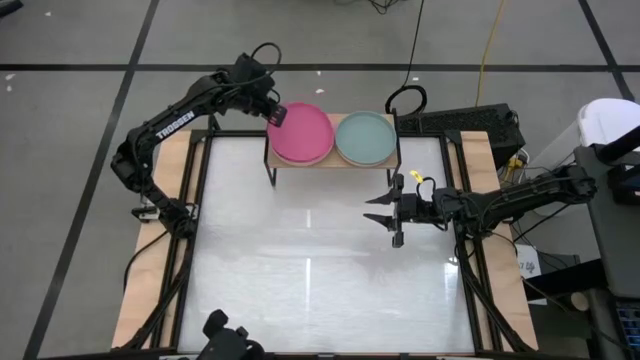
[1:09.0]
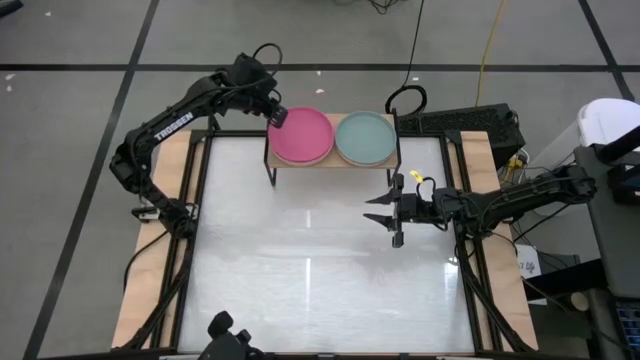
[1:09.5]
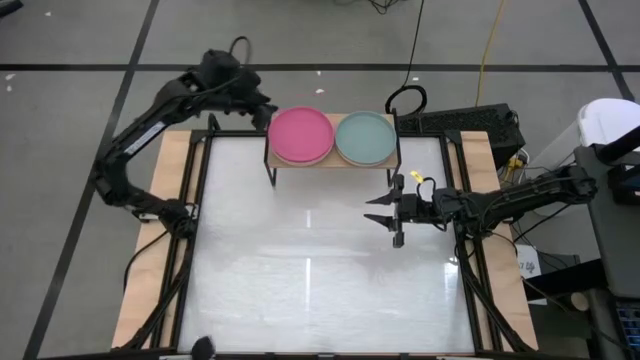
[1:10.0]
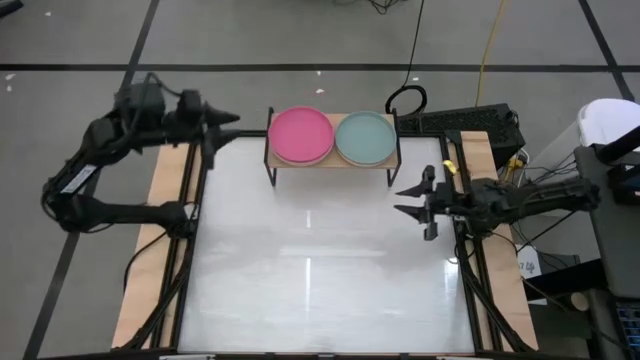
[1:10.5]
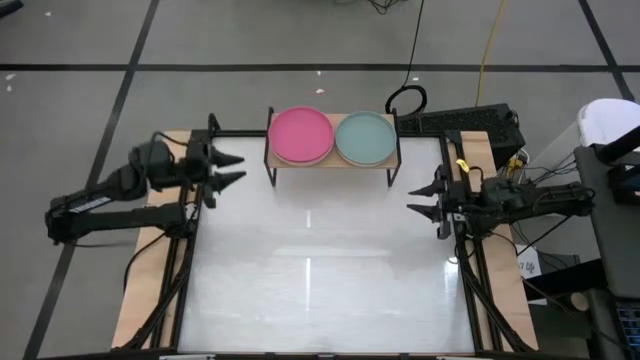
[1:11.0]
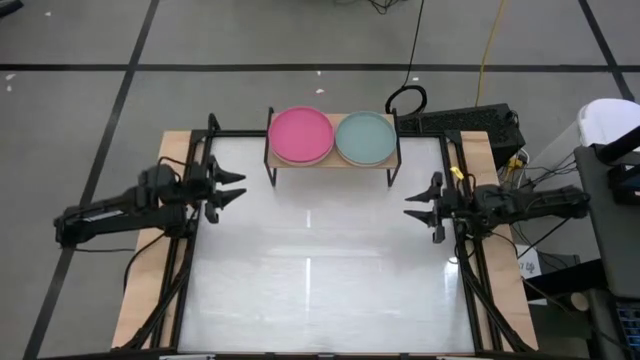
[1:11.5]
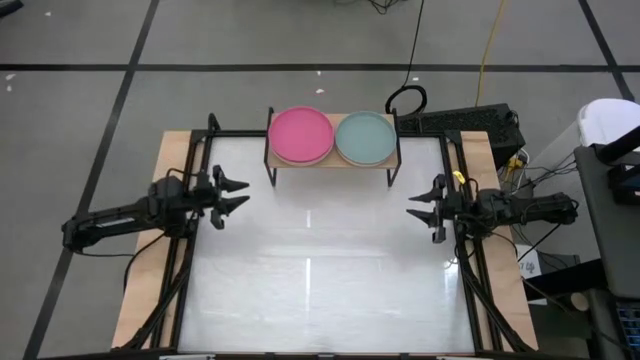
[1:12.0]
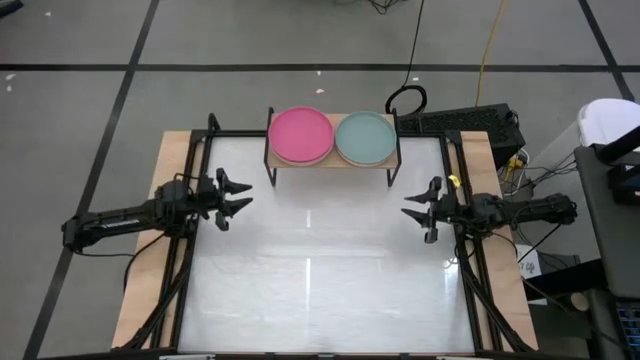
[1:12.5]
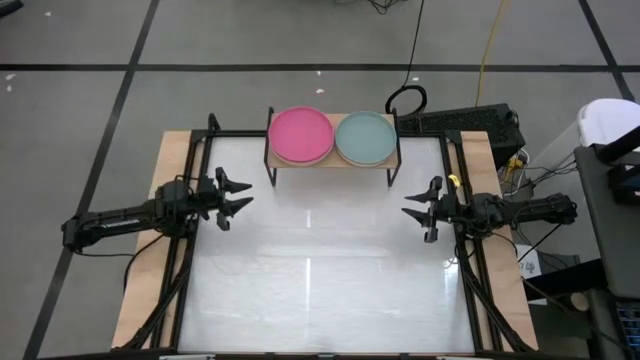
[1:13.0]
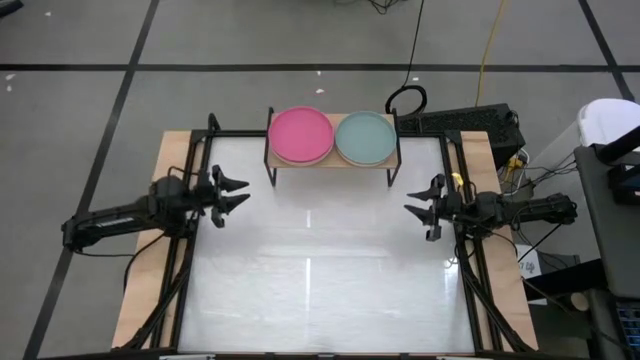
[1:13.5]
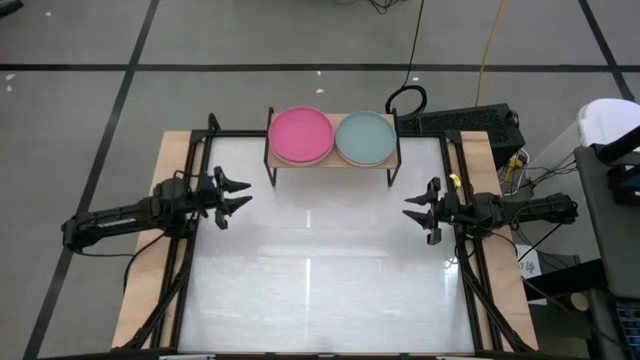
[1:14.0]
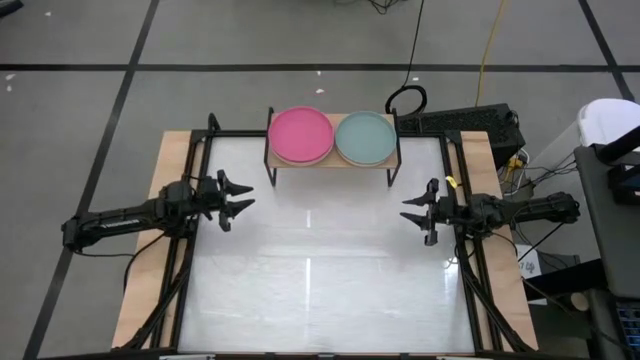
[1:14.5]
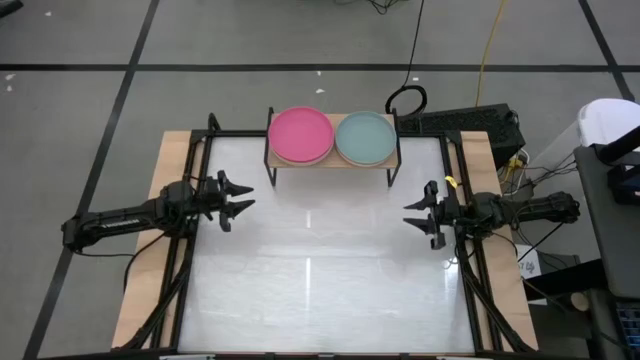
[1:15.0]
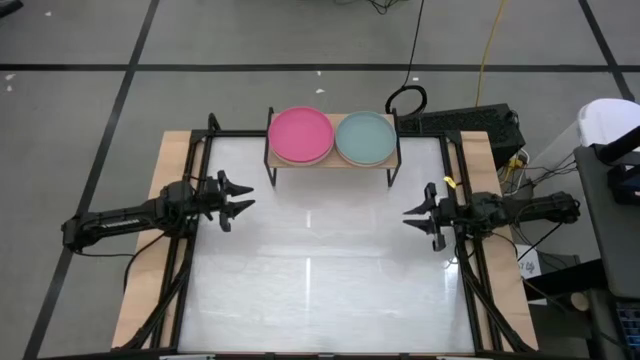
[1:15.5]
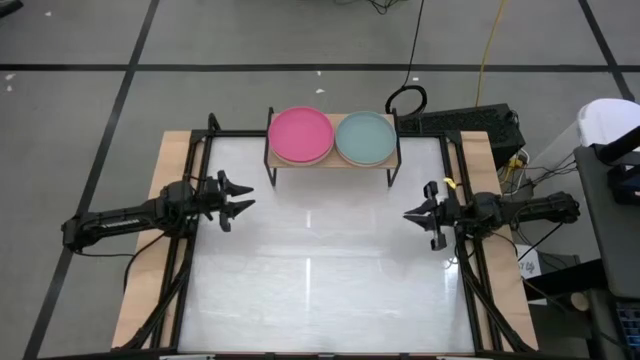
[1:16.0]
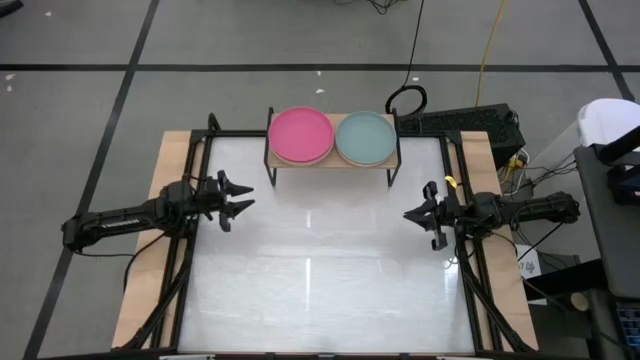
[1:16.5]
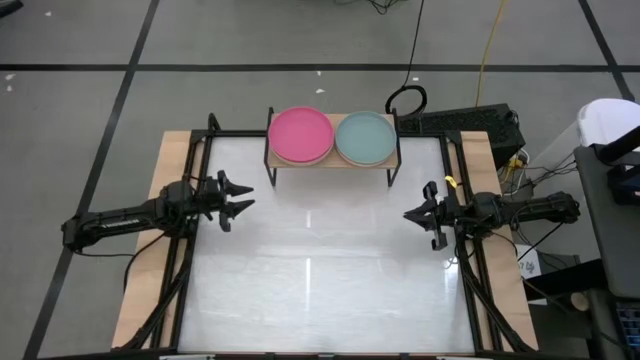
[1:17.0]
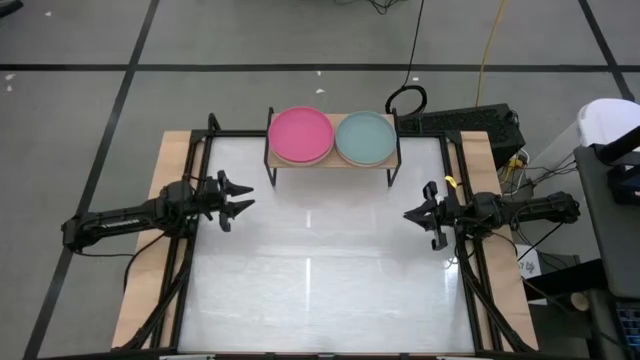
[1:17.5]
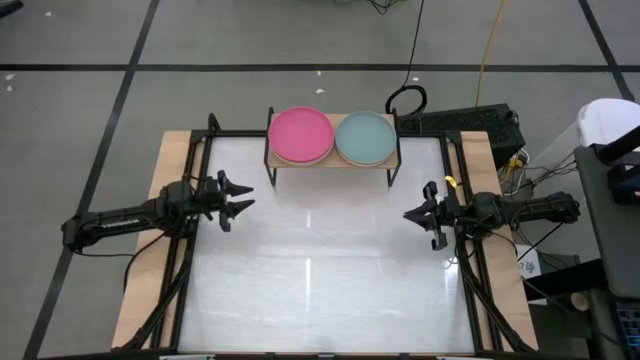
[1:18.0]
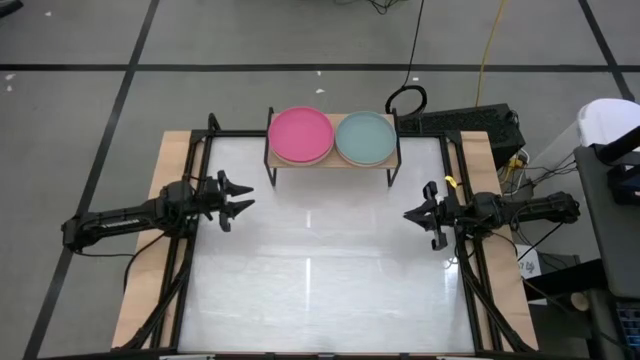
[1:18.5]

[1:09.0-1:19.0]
Task: Place and stack plates onto a shelf
Return to Home Position

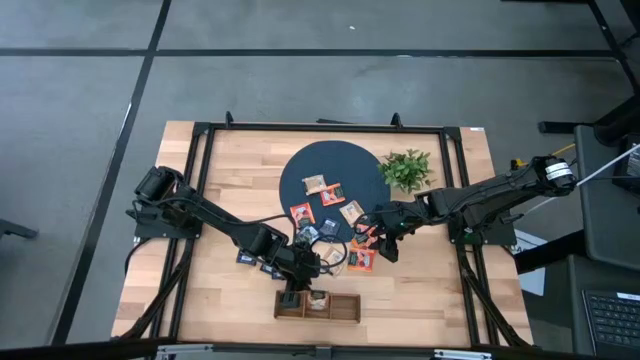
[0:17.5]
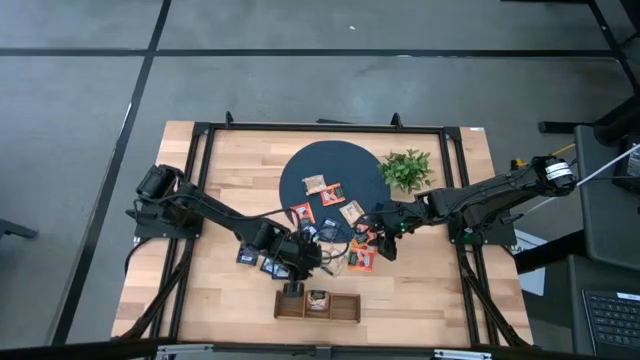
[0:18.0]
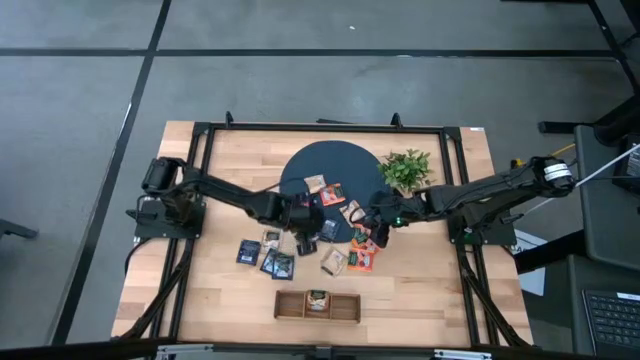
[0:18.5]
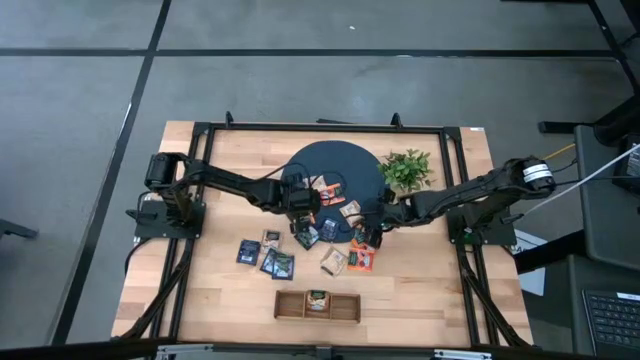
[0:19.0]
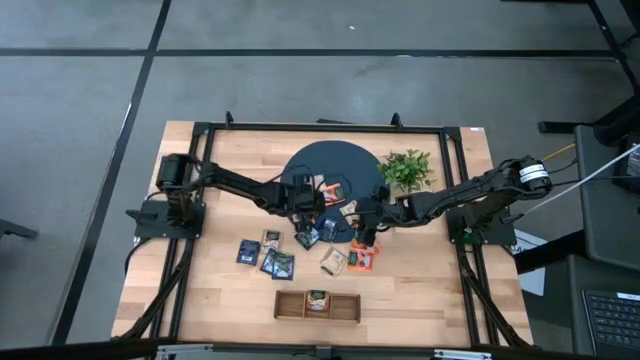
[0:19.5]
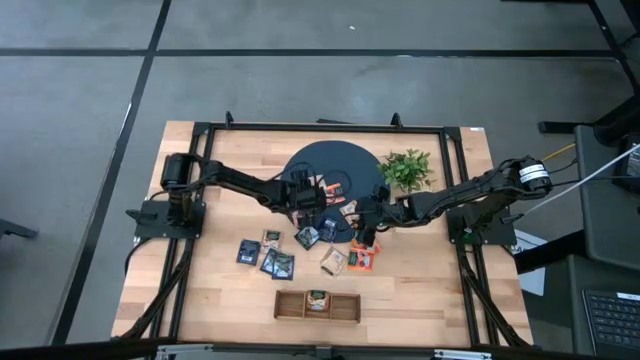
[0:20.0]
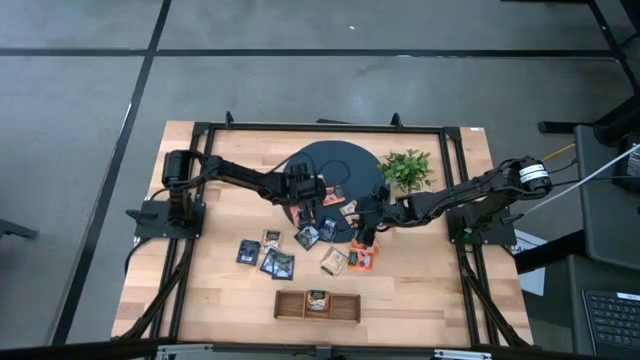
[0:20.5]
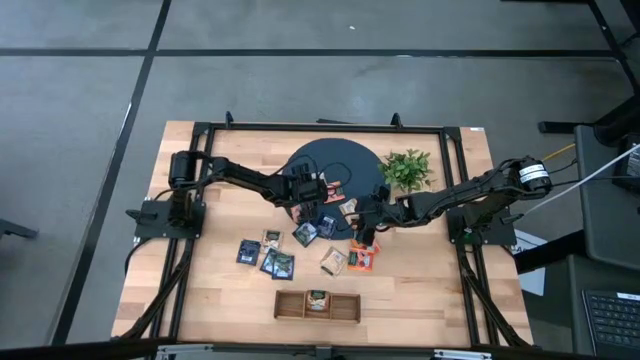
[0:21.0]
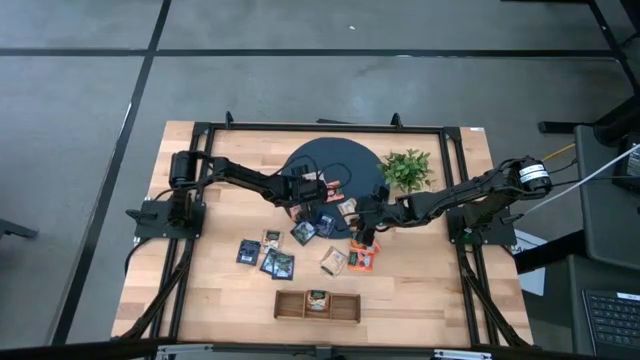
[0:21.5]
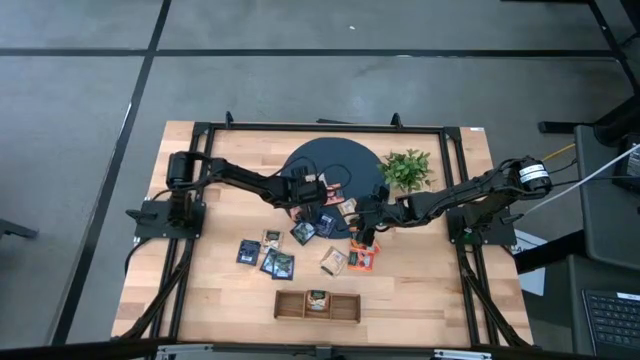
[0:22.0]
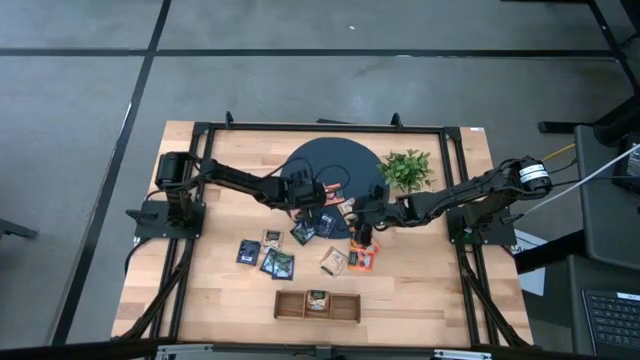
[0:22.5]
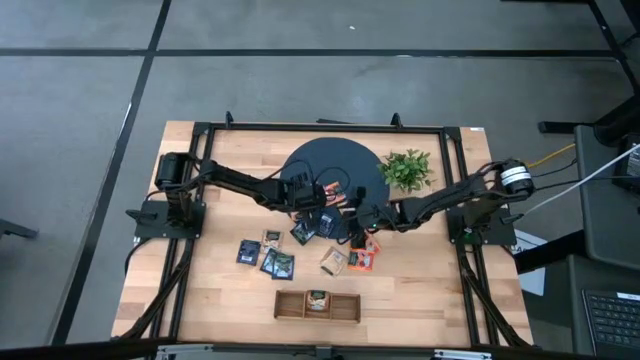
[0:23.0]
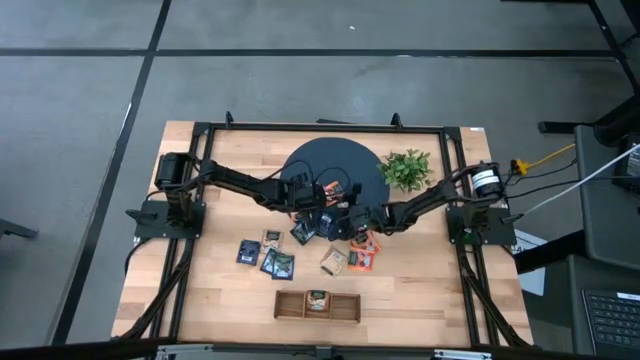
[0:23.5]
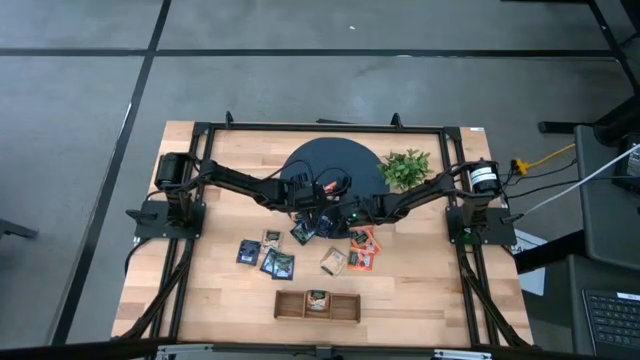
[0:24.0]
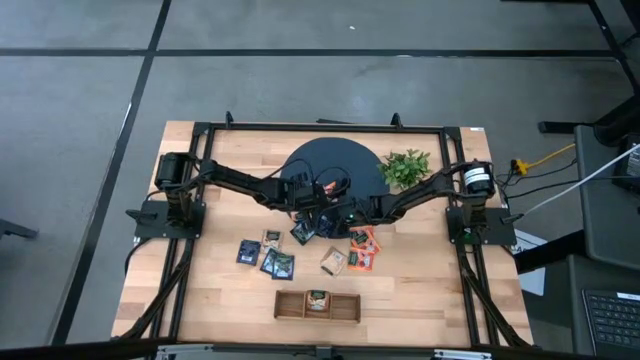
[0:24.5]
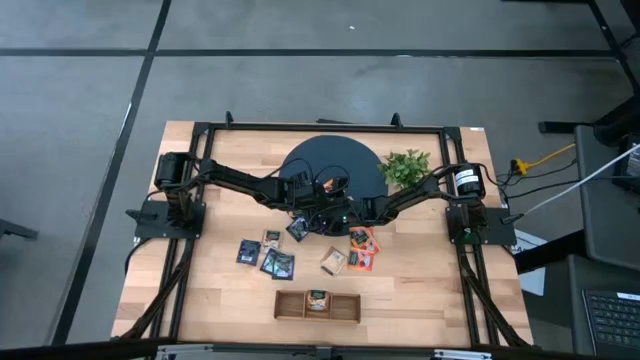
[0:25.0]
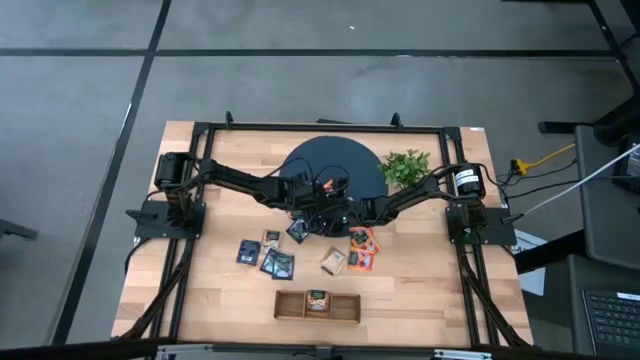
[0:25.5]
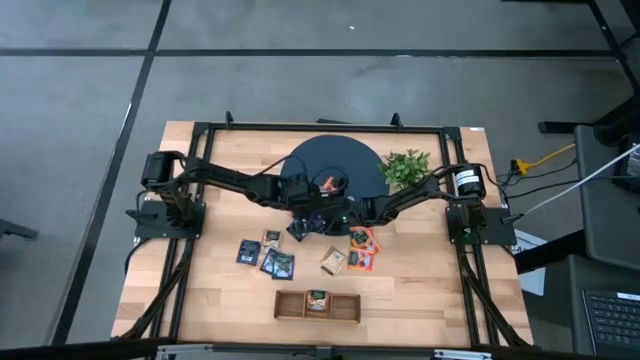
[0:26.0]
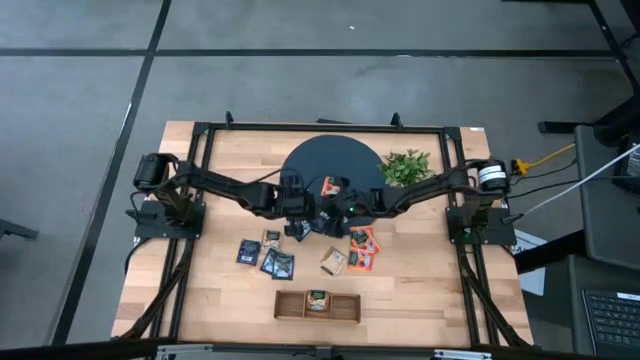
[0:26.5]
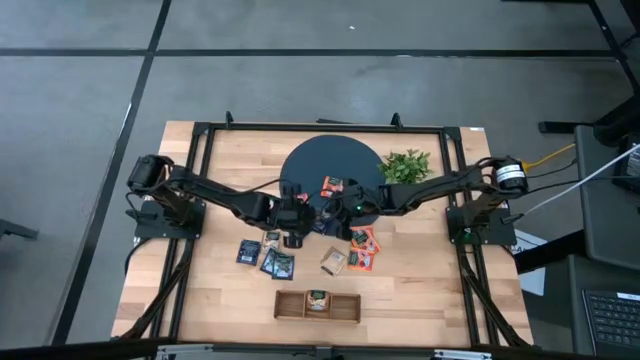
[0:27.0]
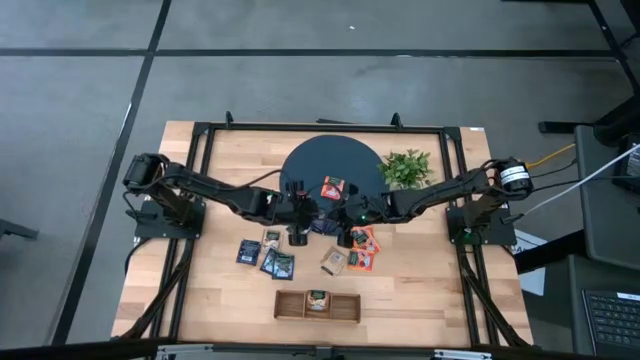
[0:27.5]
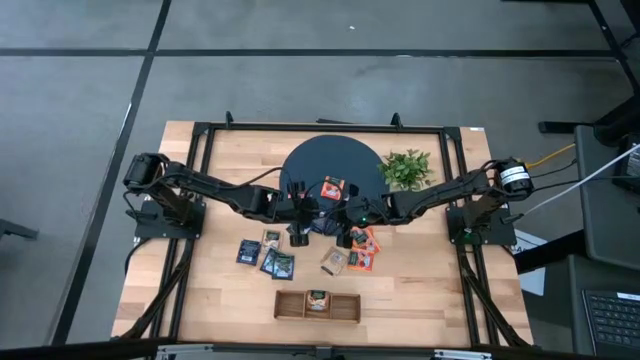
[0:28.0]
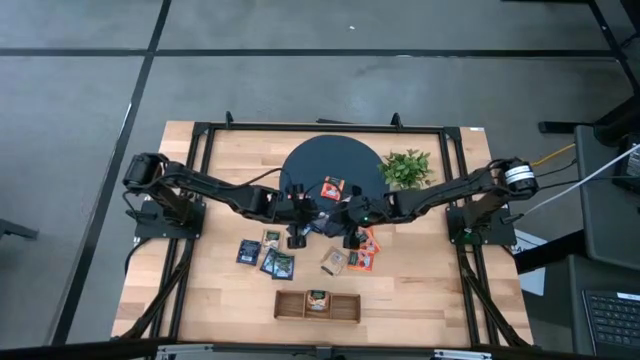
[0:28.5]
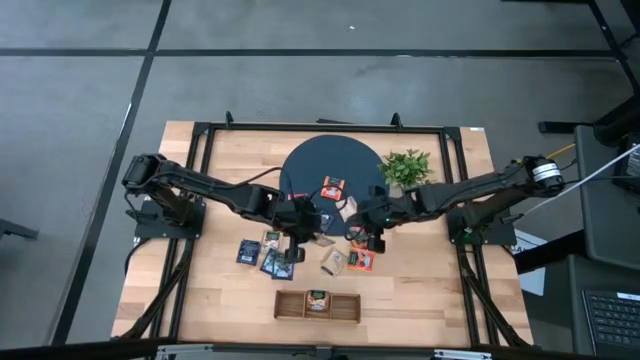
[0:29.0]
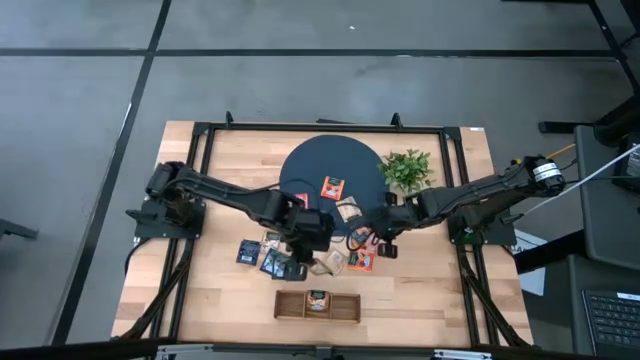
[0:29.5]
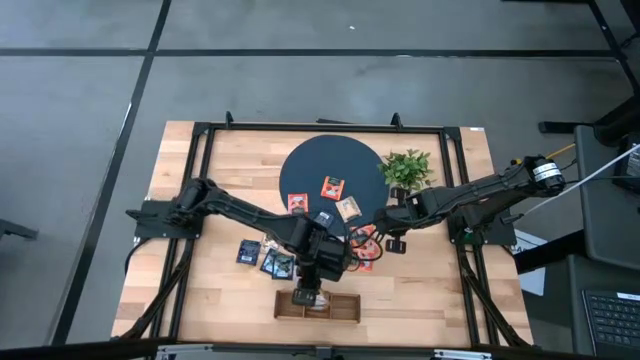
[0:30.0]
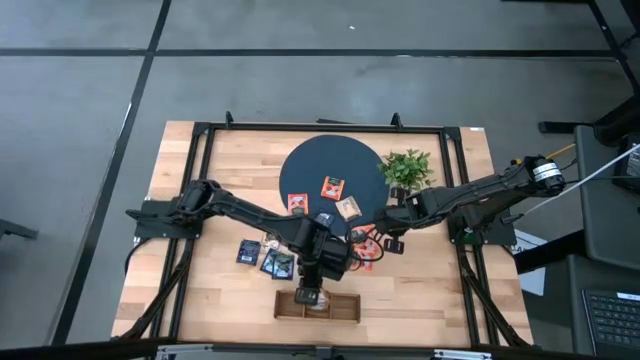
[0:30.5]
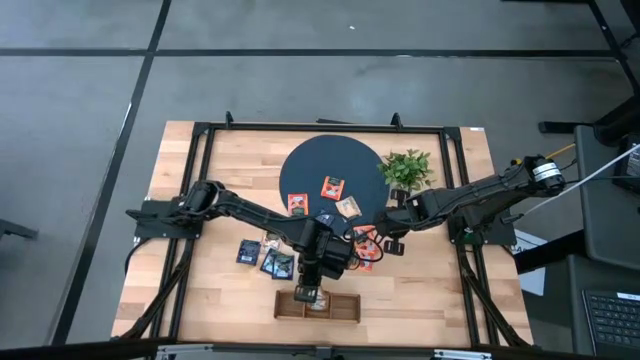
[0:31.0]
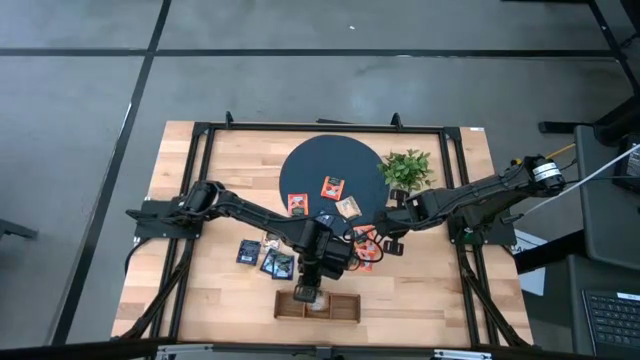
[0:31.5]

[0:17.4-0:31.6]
Task: Pick & Place Tea
Put the brown tea bag into the middle section of the wooden organizer
